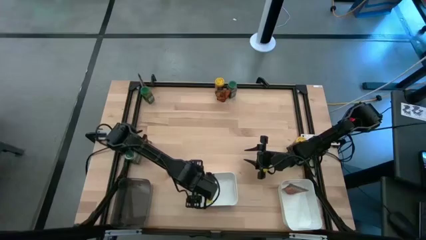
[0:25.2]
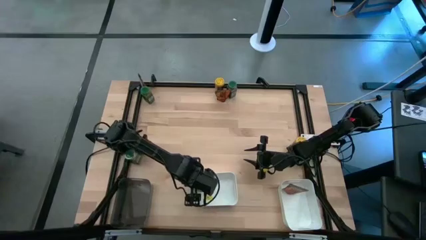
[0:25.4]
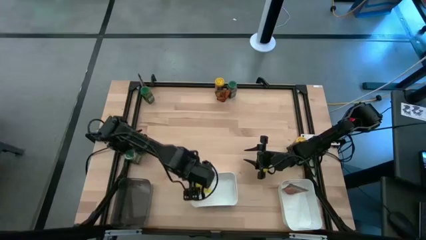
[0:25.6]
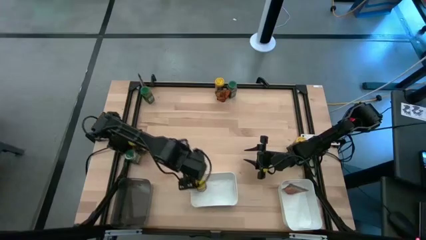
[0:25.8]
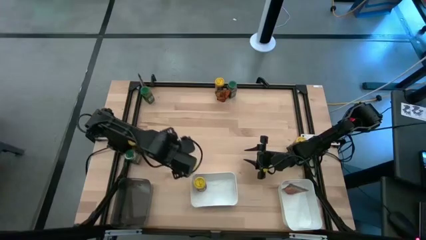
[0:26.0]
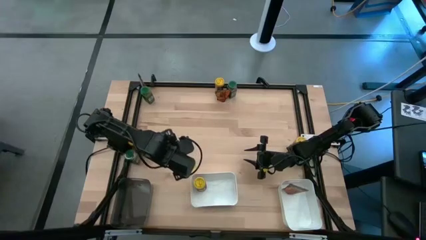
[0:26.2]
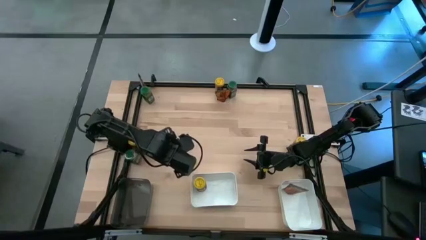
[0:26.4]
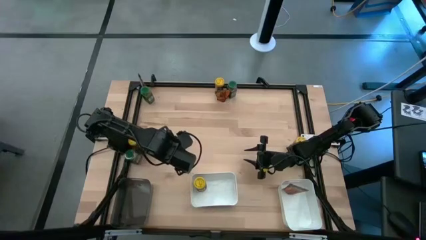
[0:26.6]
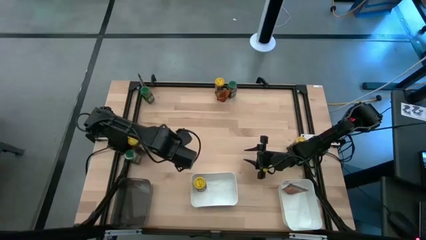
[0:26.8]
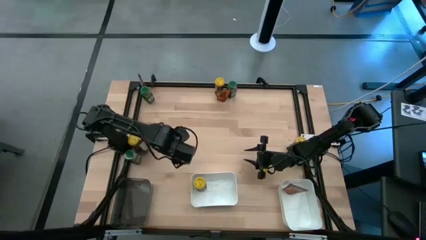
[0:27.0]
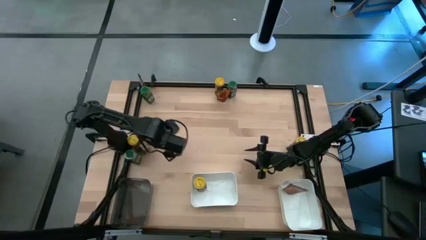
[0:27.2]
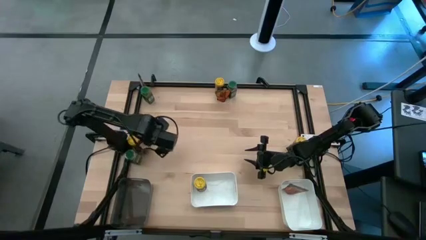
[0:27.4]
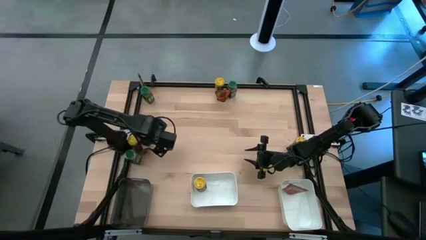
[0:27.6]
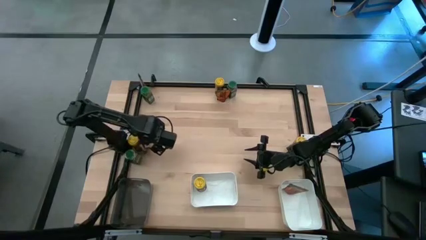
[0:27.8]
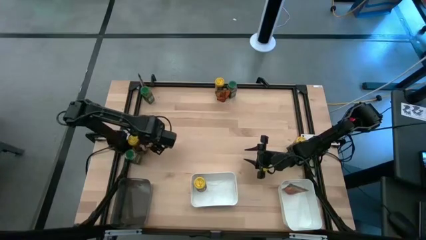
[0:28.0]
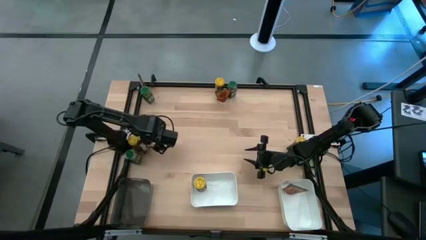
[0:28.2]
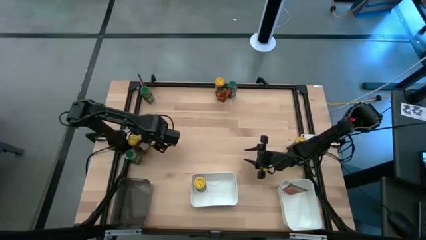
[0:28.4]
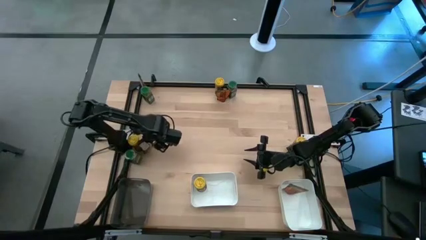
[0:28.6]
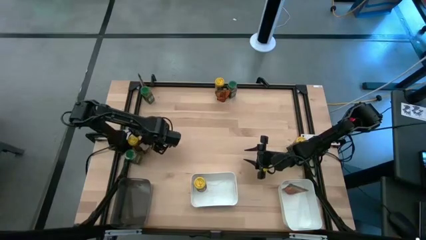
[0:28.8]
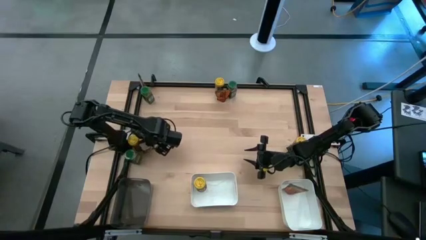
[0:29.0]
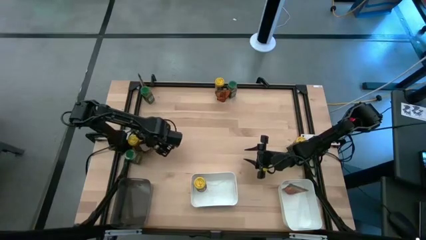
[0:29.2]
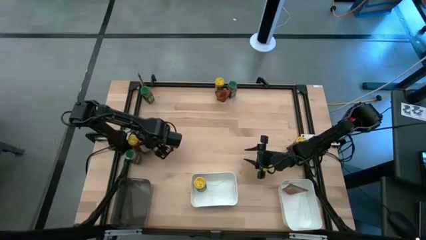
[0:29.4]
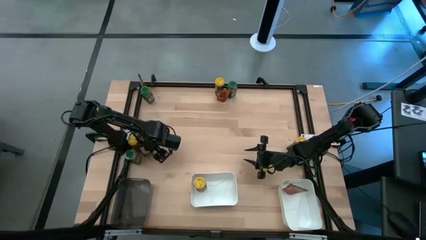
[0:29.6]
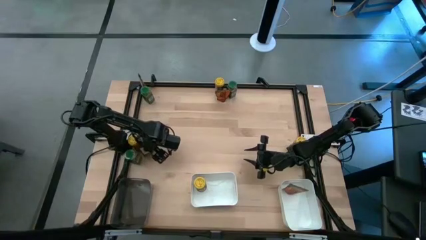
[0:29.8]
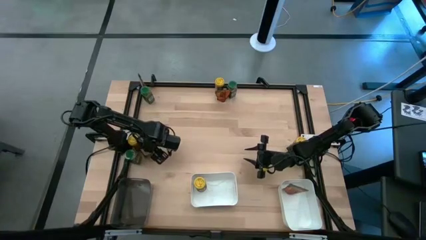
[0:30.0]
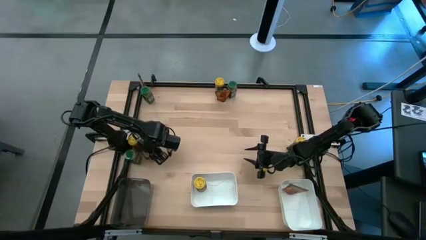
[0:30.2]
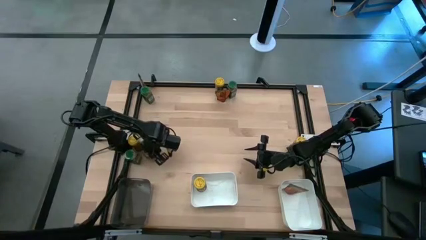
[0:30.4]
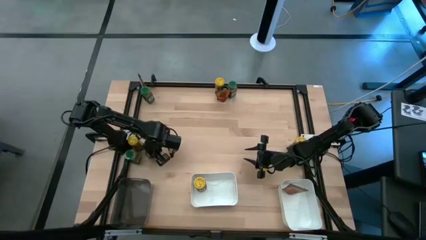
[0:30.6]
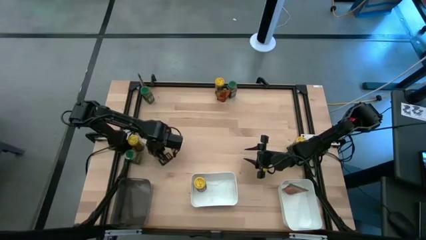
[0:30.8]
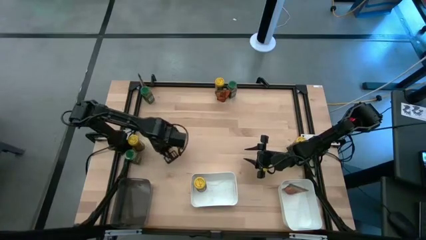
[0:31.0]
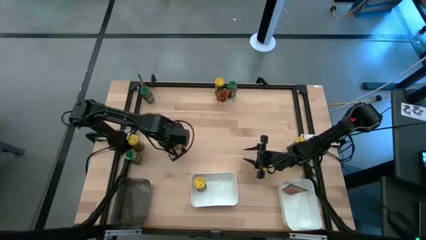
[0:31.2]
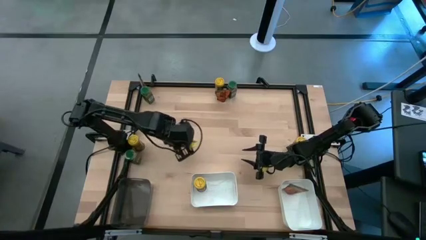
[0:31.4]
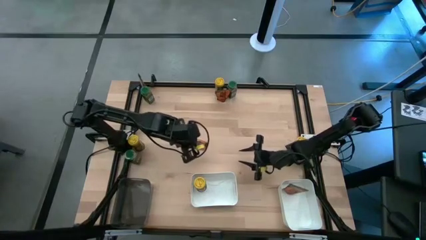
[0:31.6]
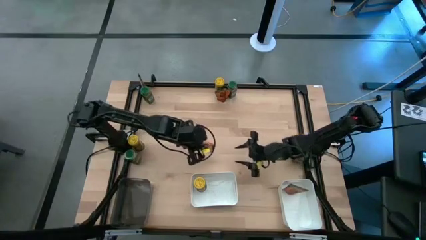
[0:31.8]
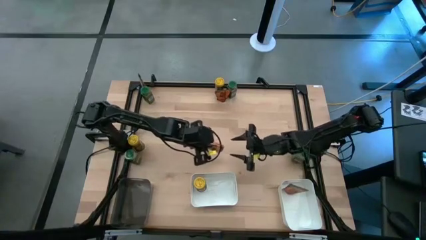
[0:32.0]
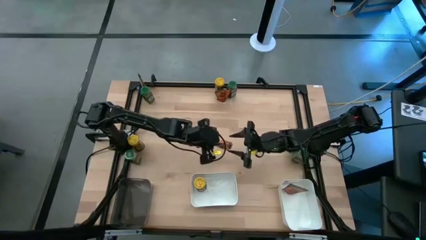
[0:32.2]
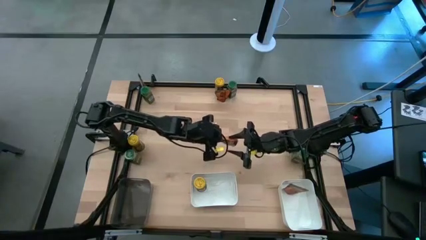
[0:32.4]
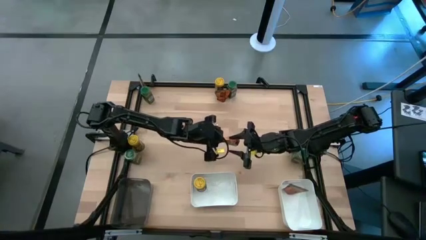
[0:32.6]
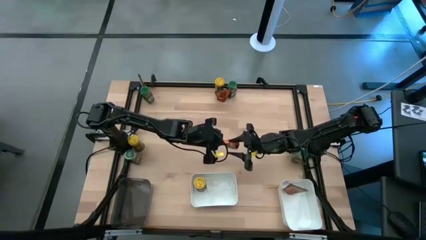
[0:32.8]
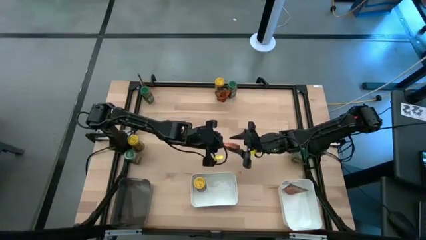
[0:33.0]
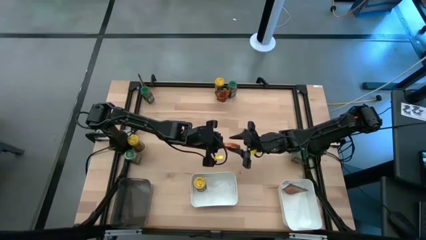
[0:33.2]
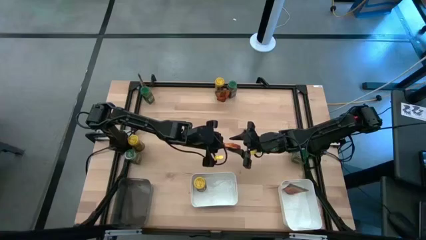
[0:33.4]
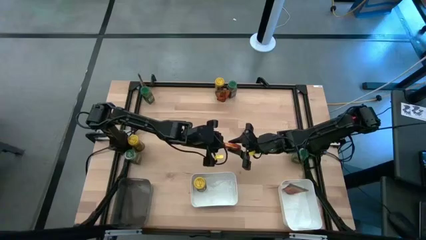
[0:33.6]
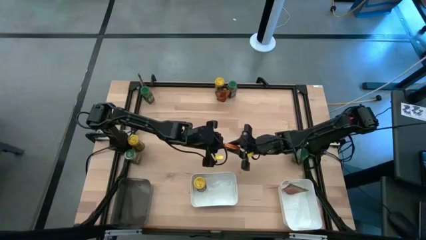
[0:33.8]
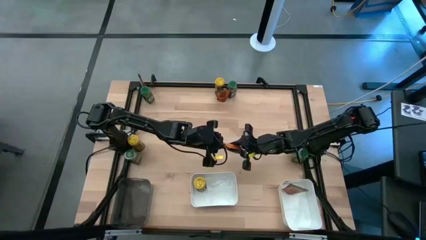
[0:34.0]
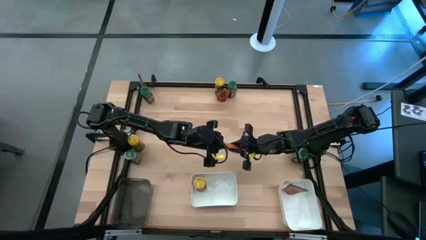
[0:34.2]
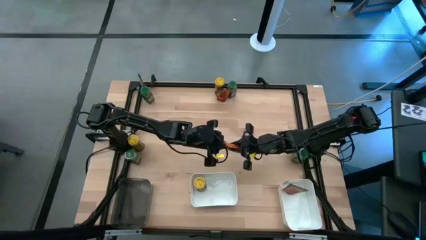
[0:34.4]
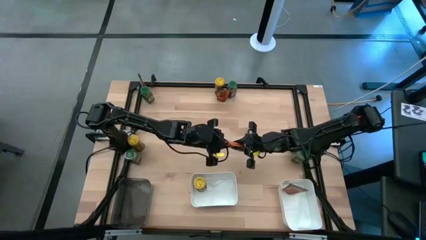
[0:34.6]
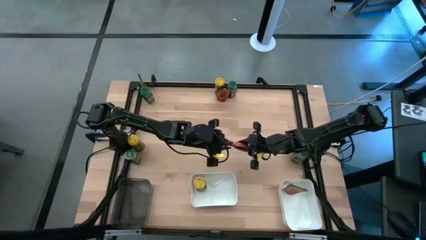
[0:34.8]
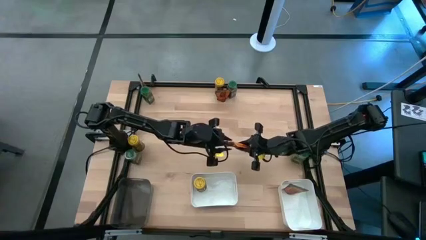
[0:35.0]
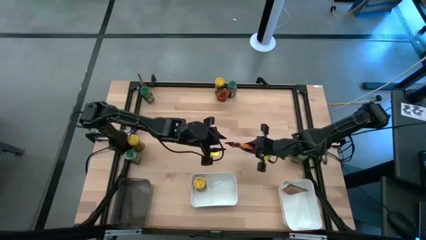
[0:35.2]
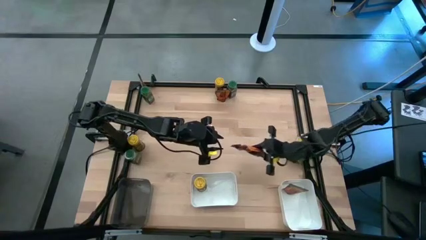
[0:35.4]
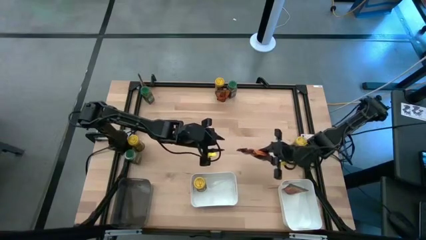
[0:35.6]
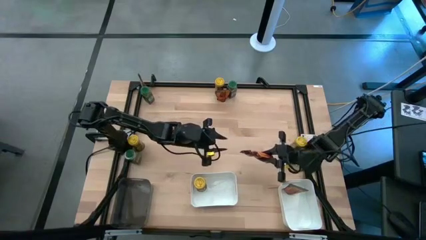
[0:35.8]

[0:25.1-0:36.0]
Task: Sort spices by type
Put the bottom left brown seasoning bag into the right white bin
